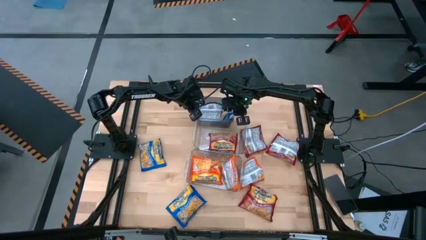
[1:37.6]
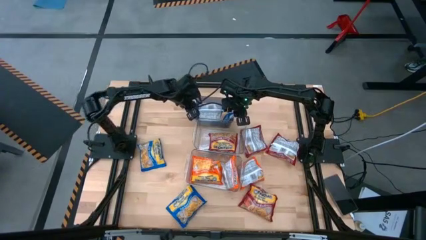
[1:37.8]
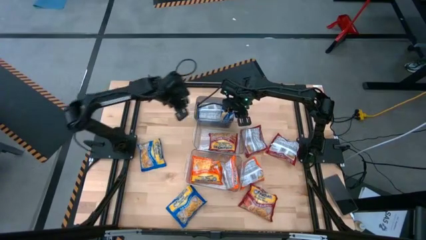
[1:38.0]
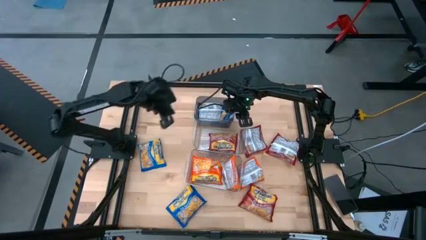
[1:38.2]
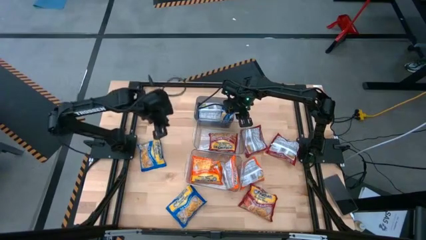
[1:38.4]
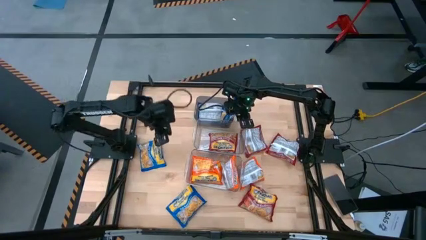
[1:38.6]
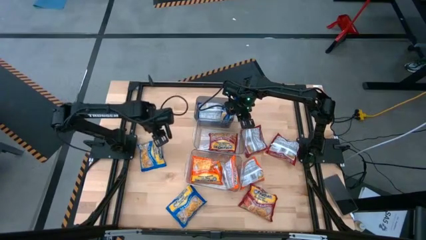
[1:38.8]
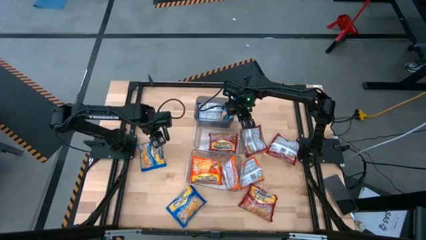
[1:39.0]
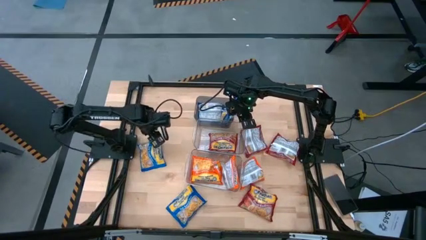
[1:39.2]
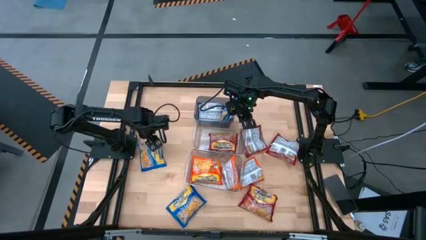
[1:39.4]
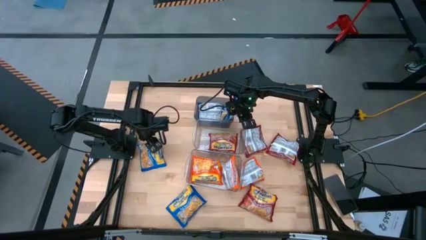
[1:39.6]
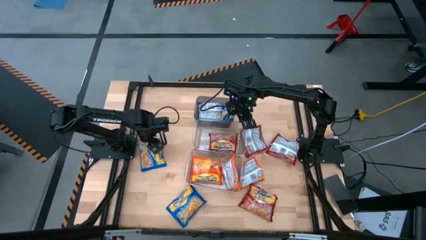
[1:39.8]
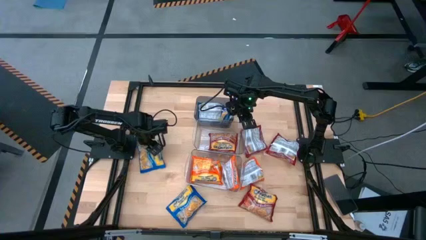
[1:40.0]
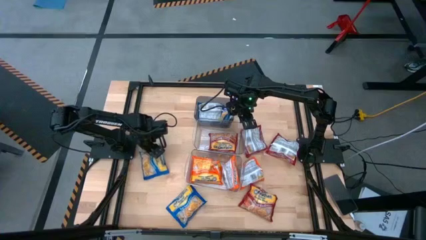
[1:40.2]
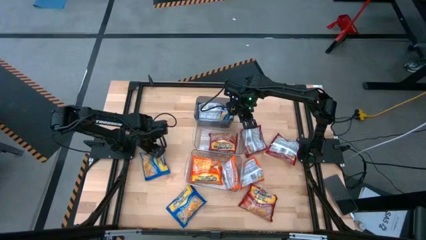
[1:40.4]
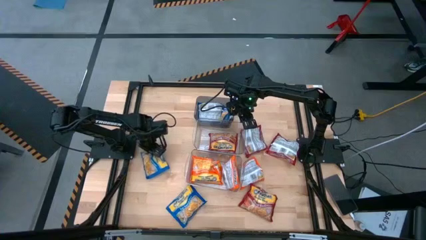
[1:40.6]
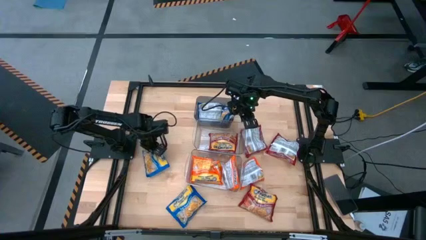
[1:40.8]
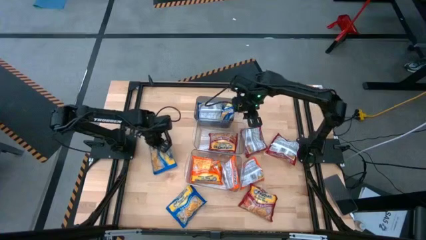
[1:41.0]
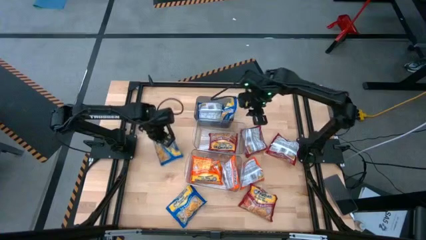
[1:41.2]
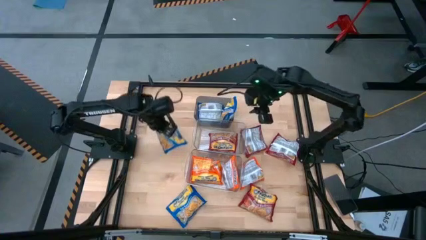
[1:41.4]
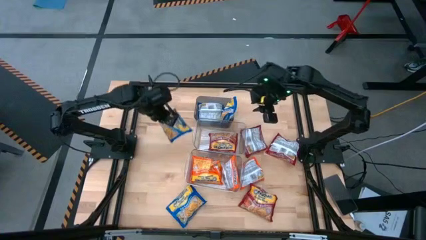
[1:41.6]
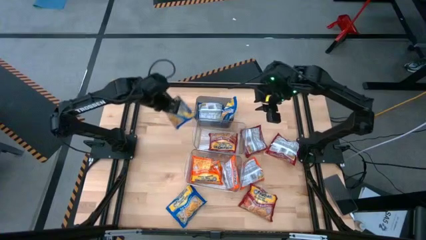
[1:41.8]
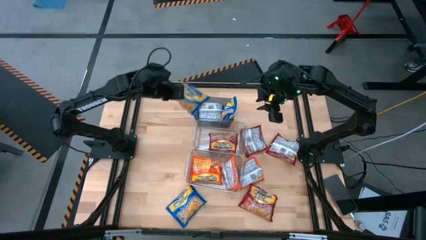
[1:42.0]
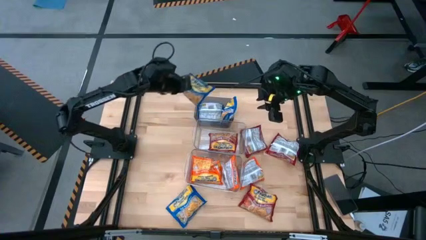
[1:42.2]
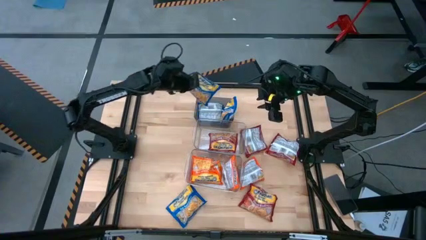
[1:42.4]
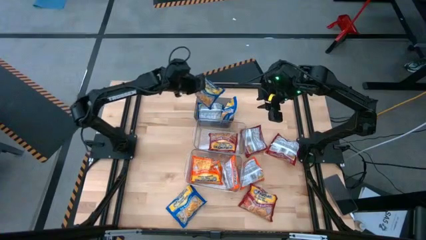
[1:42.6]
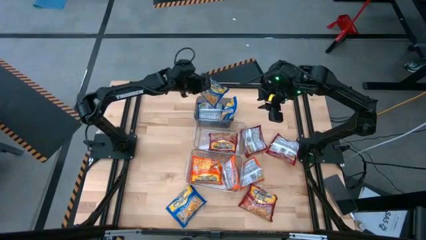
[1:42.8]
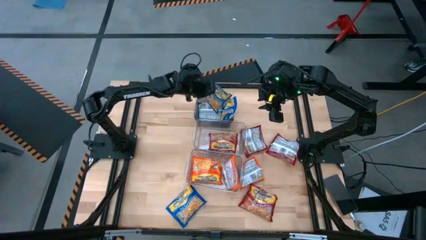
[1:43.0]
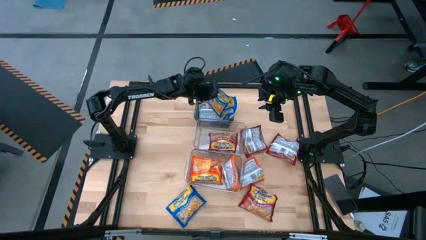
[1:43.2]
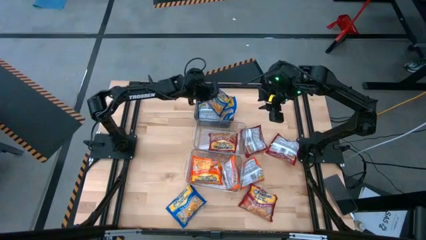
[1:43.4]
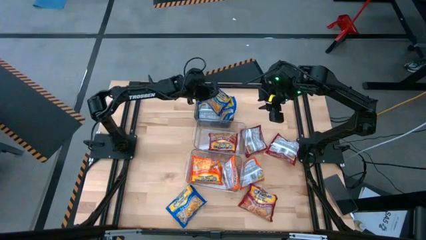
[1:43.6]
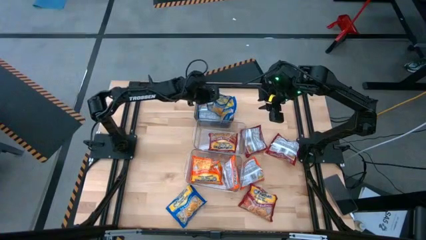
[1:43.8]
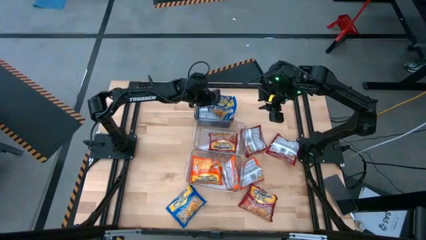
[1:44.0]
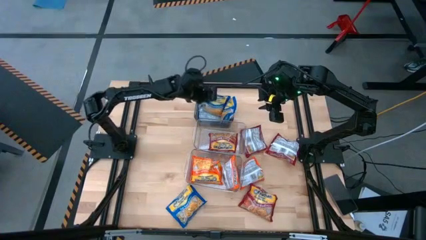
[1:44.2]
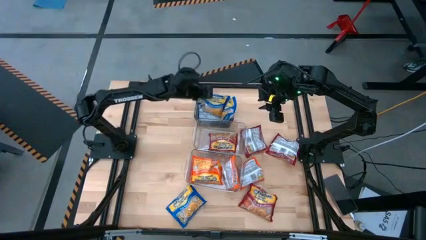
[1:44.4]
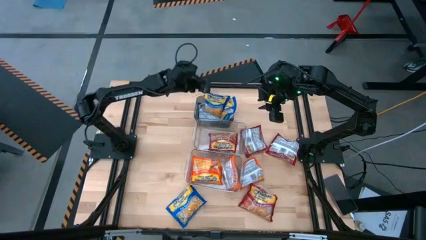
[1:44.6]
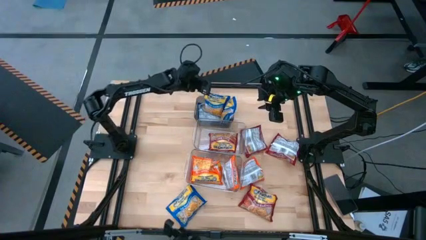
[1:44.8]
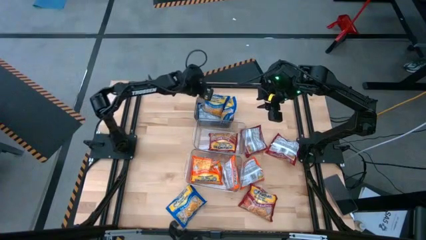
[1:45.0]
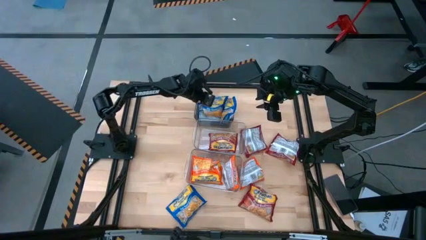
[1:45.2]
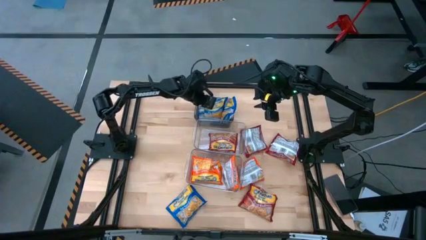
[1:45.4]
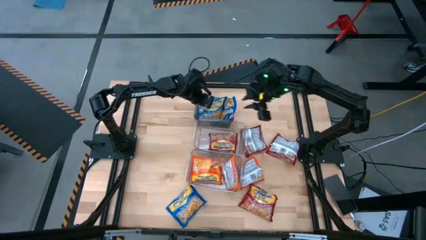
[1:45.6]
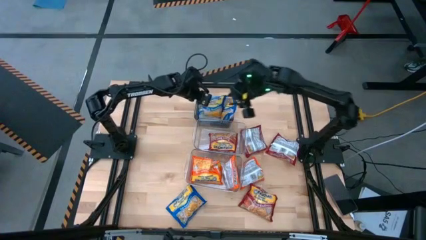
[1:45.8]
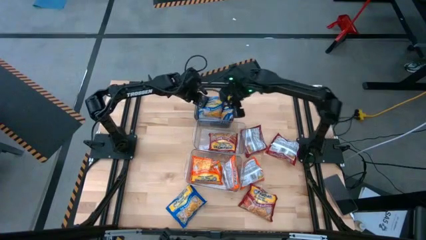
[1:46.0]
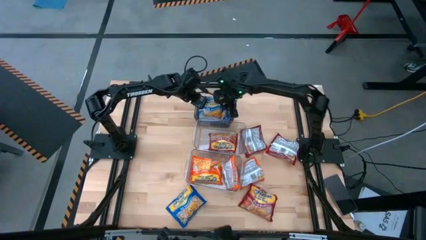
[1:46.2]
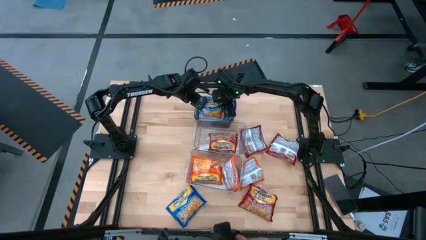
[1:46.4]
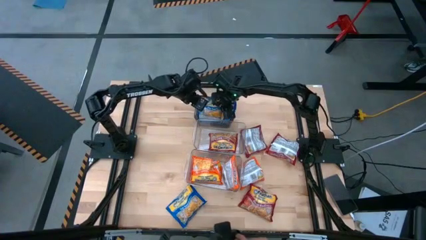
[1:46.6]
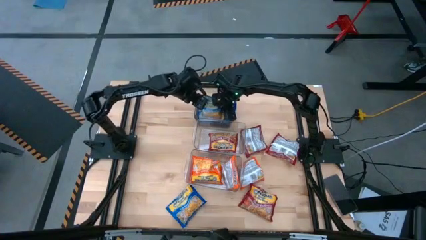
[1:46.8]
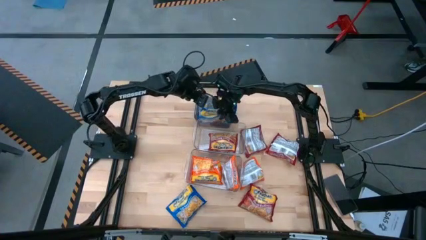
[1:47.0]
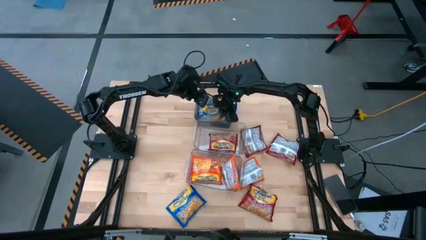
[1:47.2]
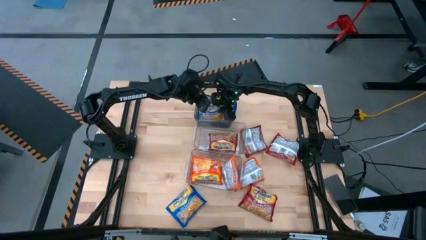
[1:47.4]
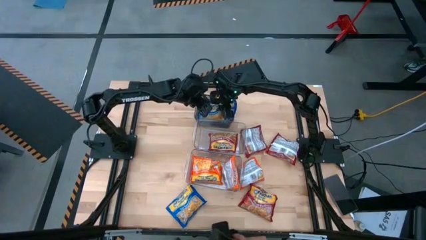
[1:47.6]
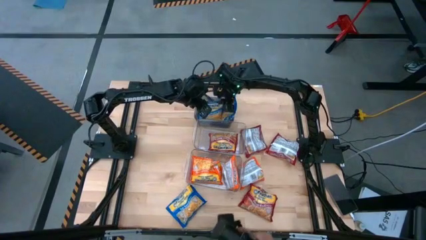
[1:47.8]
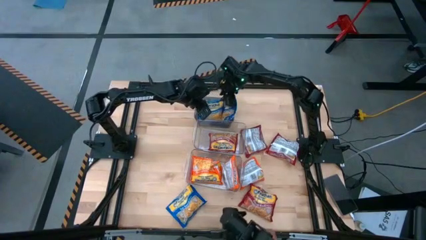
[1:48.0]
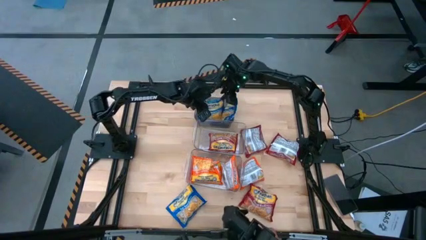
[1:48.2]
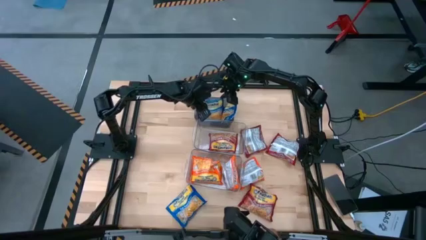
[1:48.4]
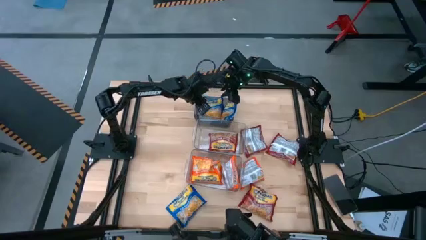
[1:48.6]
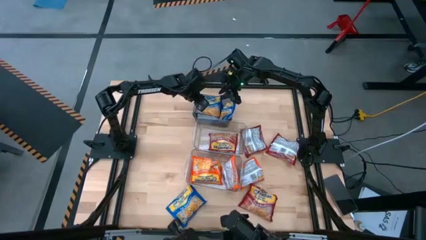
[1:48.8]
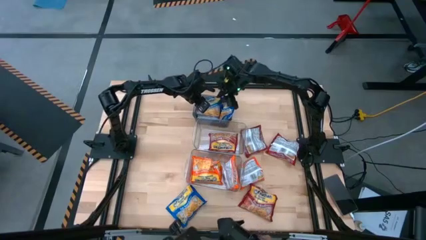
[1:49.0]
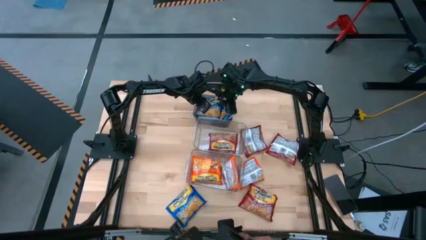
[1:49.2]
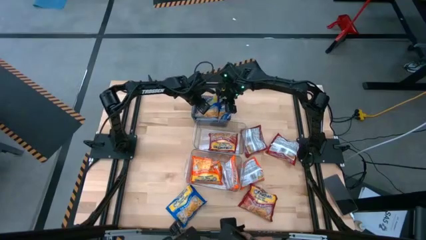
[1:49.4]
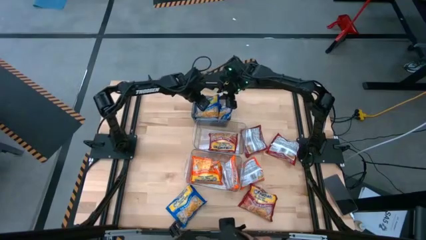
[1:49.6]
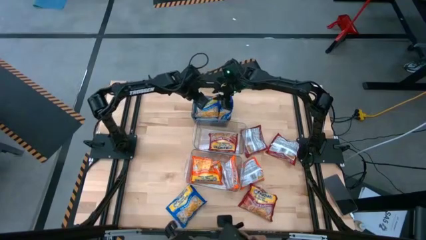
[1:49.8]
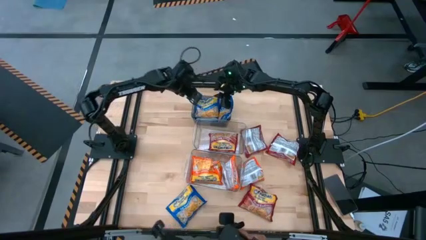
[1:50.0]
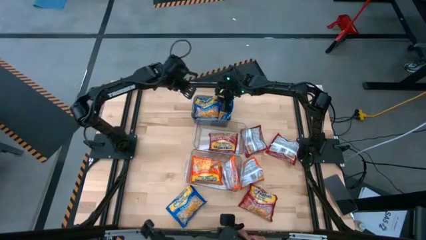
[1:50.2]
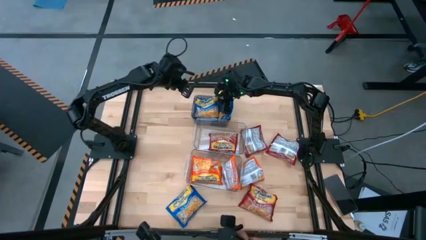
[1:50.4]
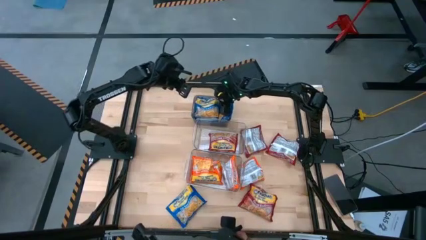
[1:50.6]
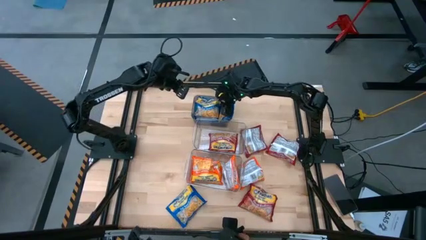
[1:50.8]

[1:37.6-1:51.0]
Task: Sort Maruchan noodles
Put the top blue noodle pack into the black bin
